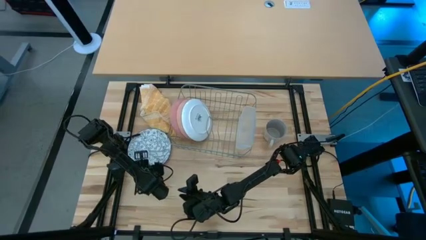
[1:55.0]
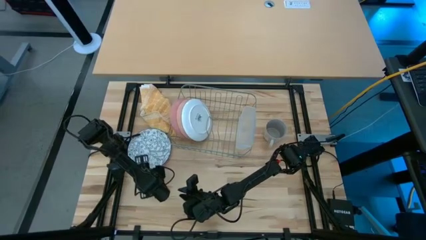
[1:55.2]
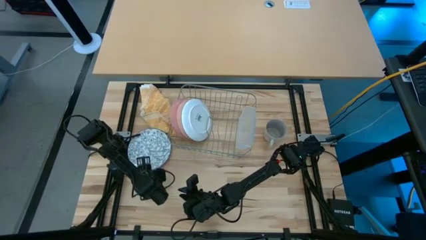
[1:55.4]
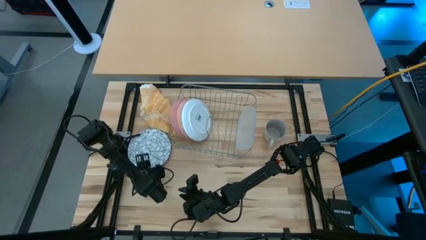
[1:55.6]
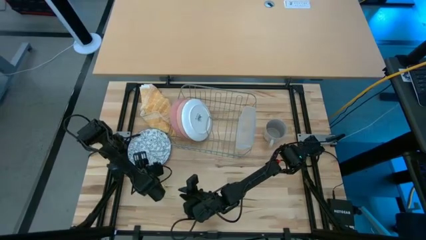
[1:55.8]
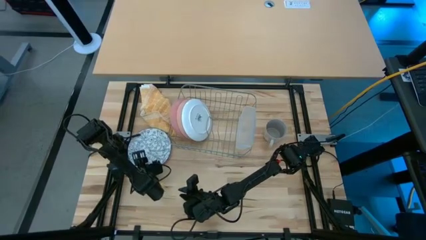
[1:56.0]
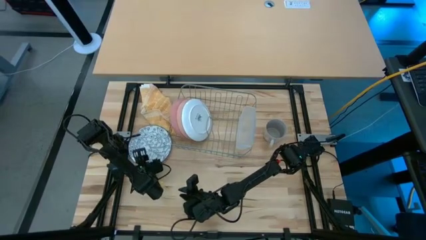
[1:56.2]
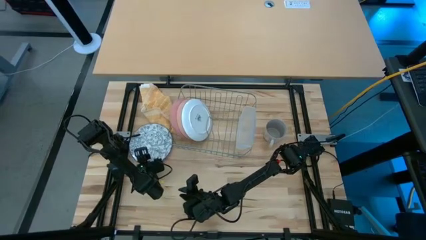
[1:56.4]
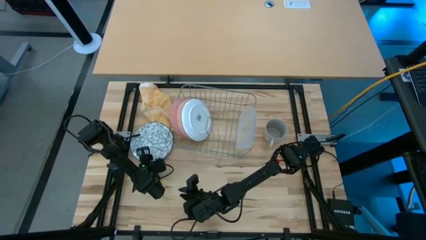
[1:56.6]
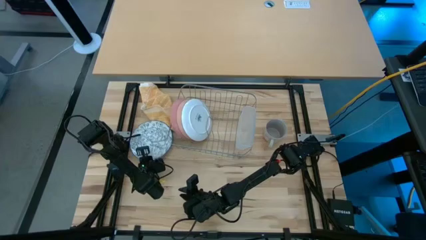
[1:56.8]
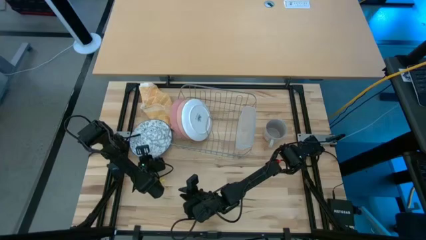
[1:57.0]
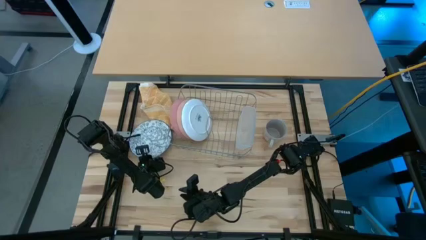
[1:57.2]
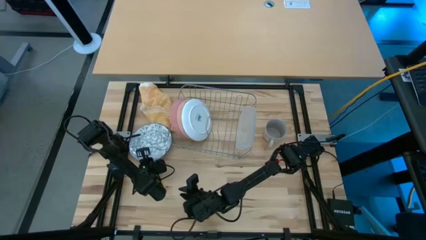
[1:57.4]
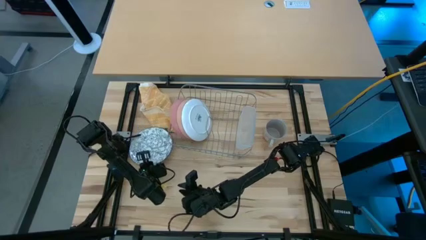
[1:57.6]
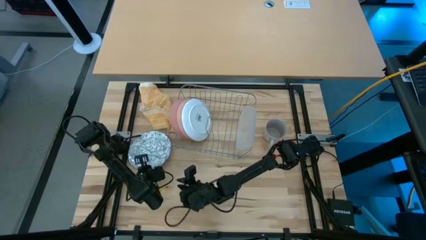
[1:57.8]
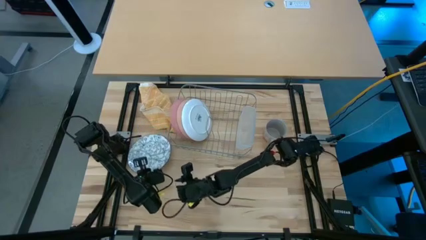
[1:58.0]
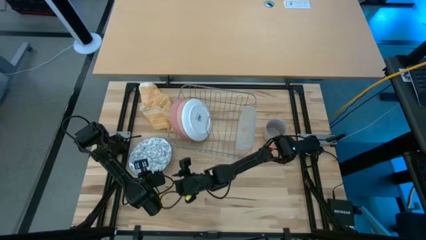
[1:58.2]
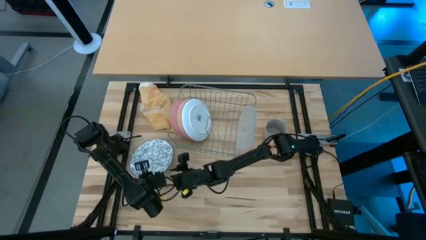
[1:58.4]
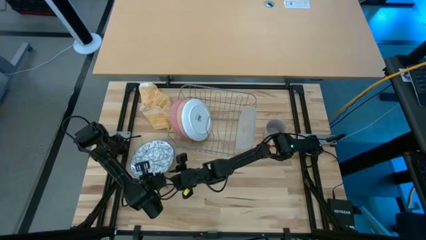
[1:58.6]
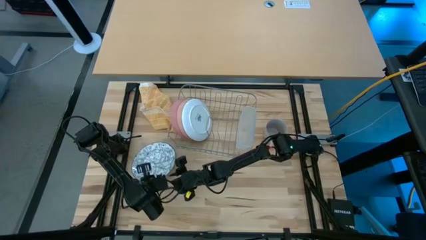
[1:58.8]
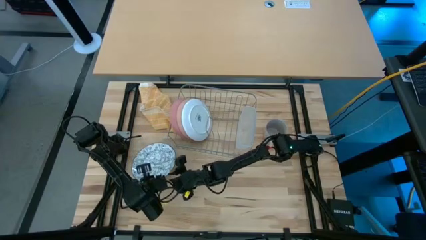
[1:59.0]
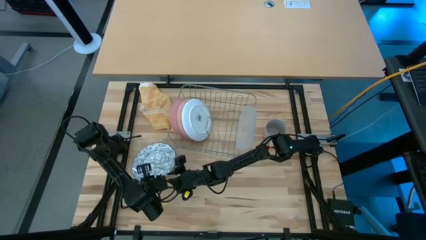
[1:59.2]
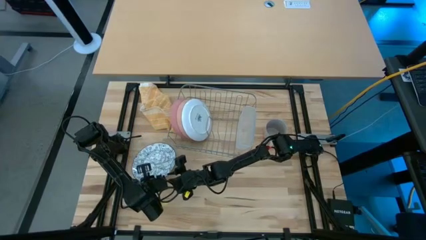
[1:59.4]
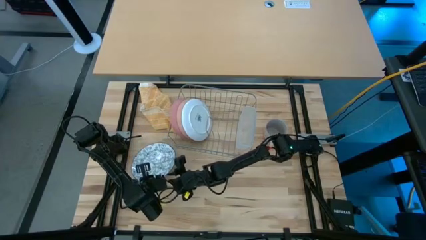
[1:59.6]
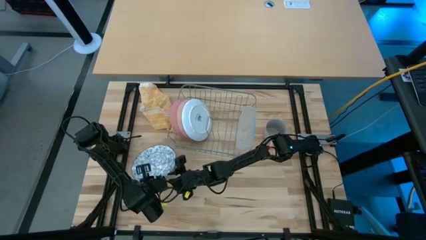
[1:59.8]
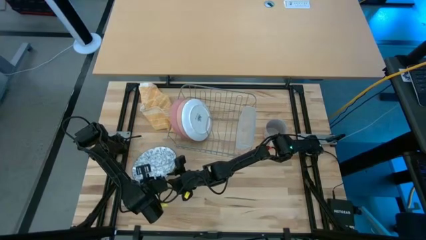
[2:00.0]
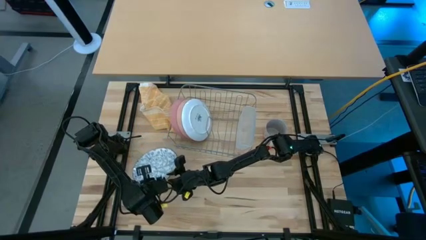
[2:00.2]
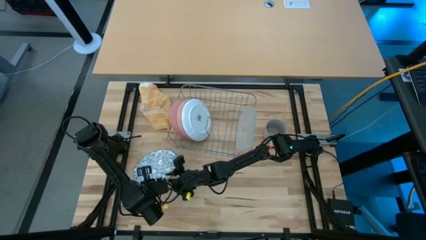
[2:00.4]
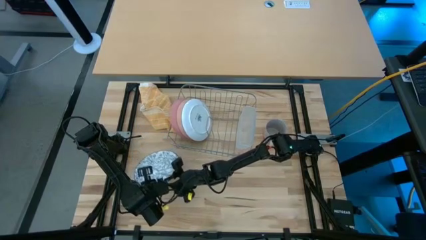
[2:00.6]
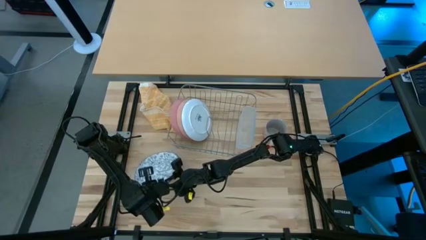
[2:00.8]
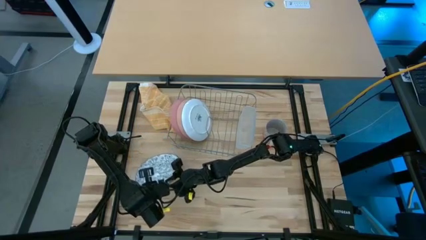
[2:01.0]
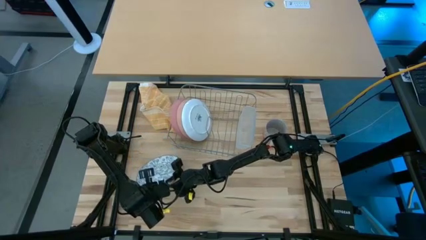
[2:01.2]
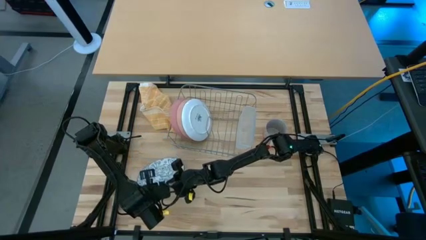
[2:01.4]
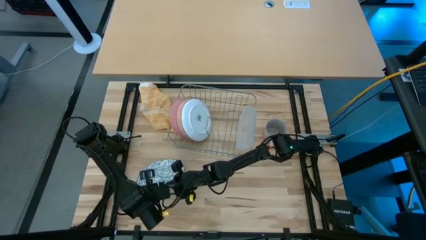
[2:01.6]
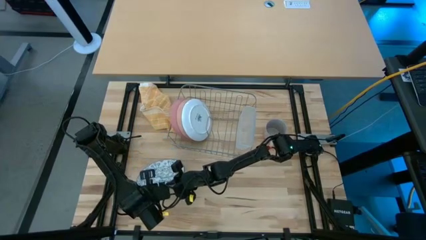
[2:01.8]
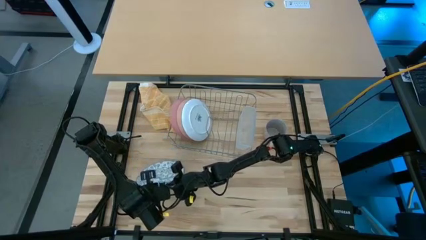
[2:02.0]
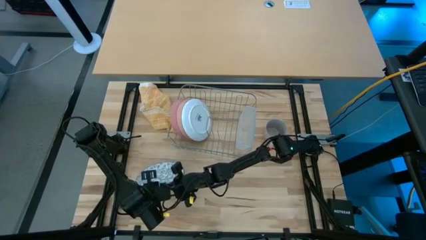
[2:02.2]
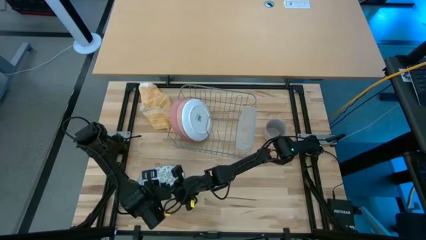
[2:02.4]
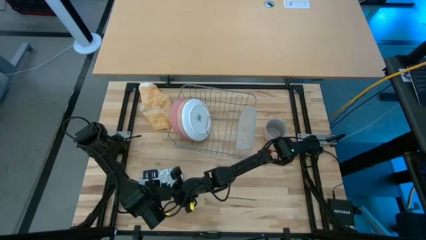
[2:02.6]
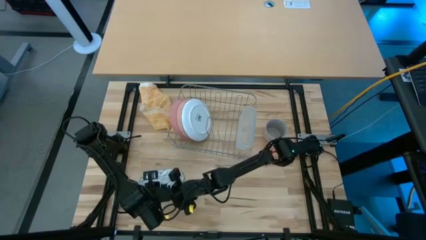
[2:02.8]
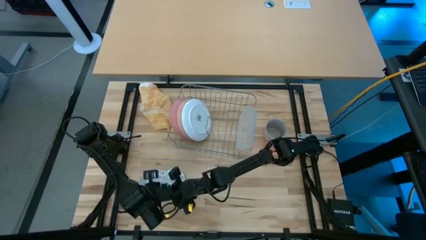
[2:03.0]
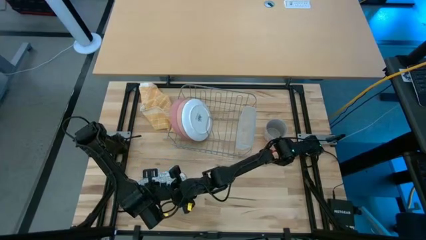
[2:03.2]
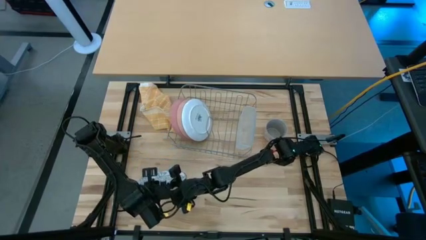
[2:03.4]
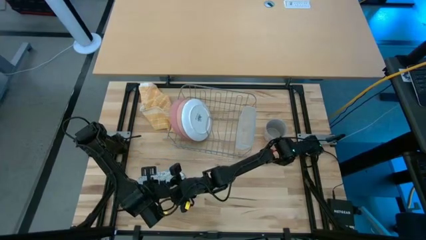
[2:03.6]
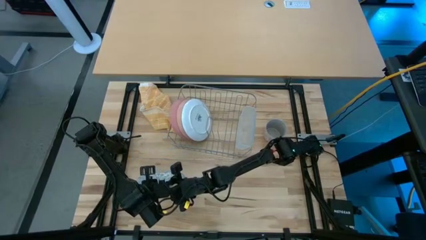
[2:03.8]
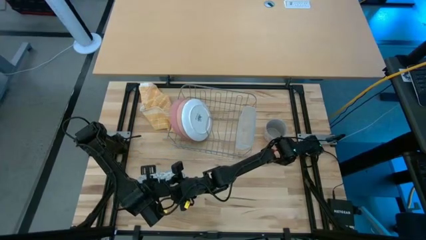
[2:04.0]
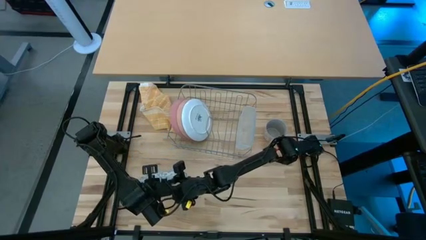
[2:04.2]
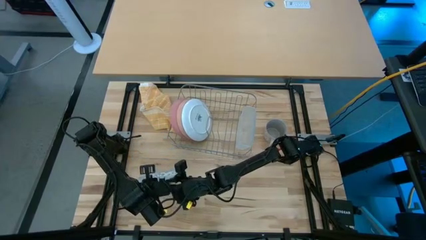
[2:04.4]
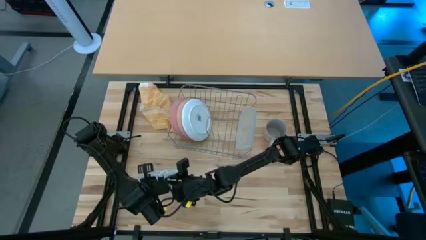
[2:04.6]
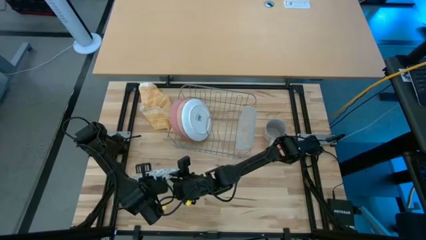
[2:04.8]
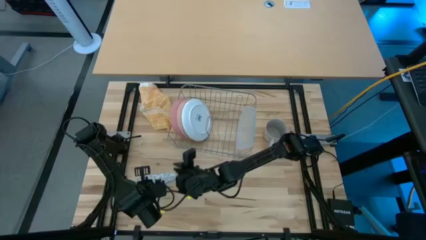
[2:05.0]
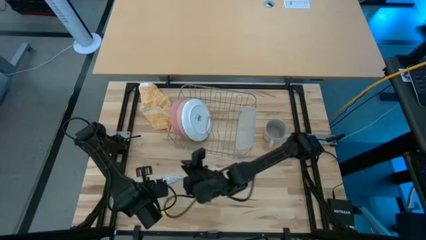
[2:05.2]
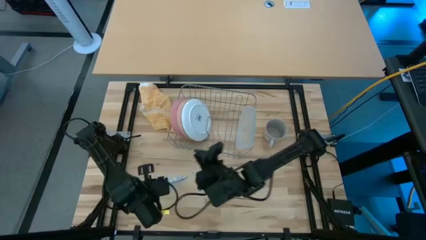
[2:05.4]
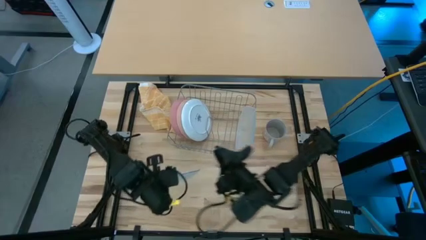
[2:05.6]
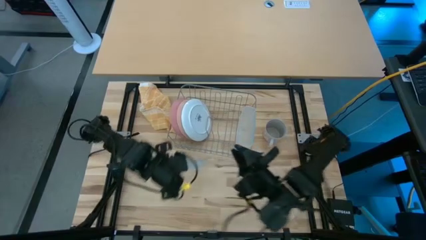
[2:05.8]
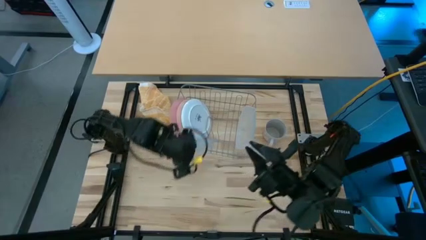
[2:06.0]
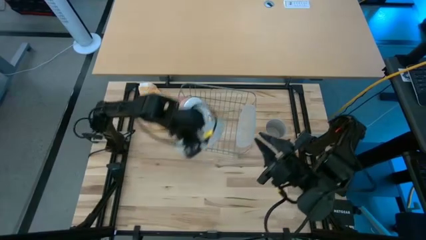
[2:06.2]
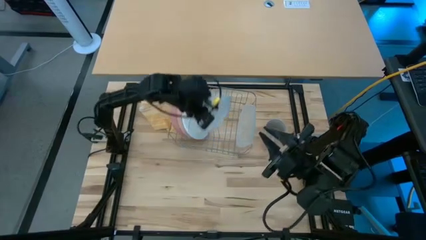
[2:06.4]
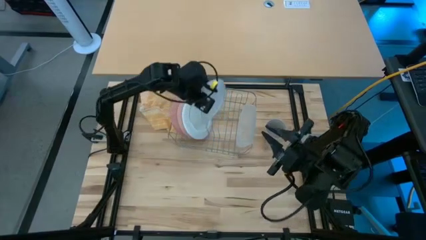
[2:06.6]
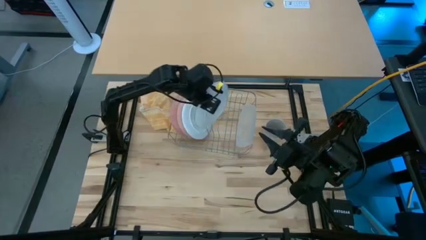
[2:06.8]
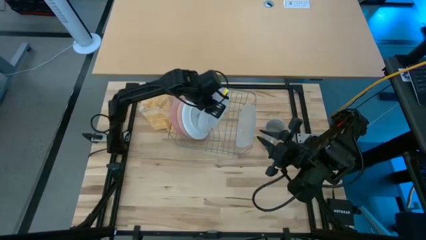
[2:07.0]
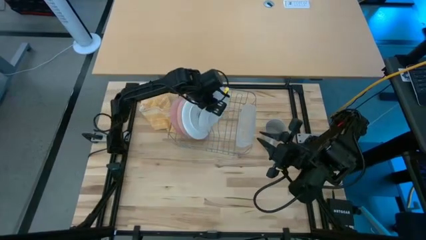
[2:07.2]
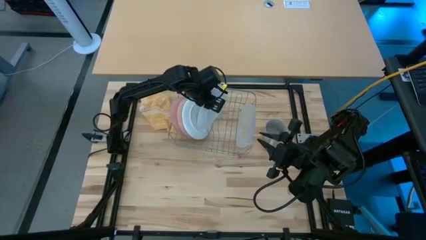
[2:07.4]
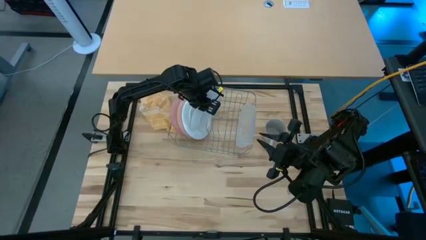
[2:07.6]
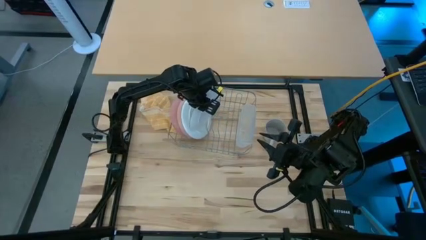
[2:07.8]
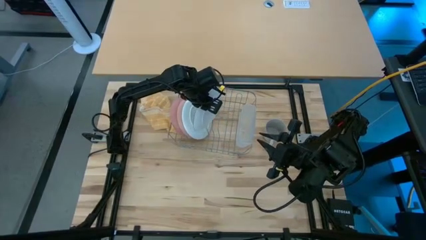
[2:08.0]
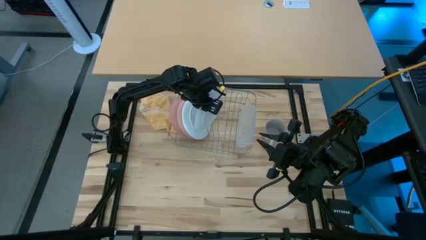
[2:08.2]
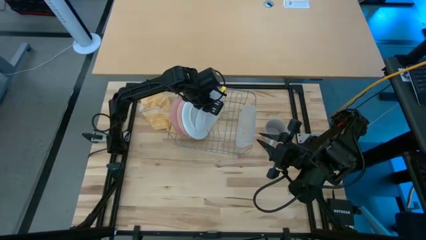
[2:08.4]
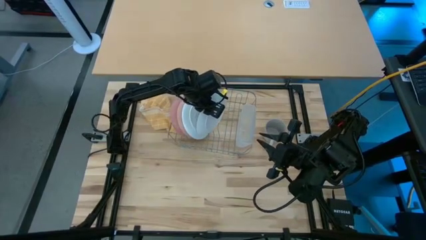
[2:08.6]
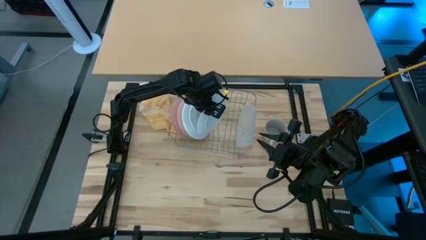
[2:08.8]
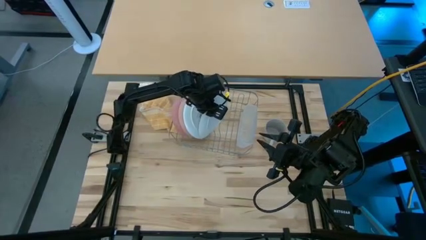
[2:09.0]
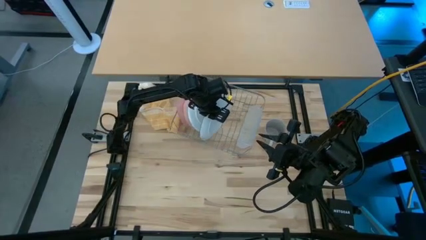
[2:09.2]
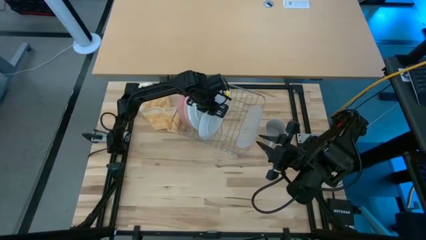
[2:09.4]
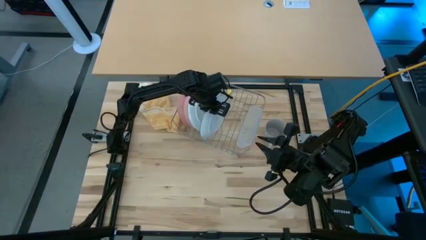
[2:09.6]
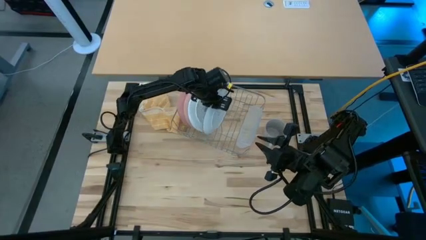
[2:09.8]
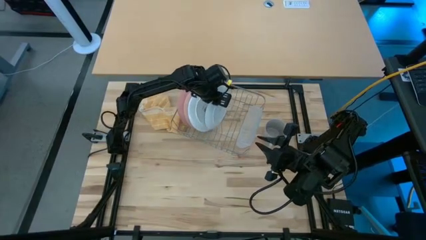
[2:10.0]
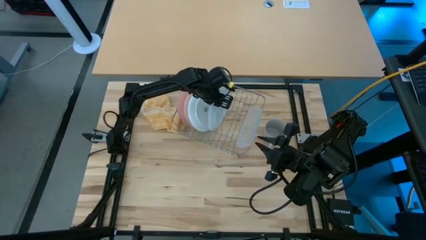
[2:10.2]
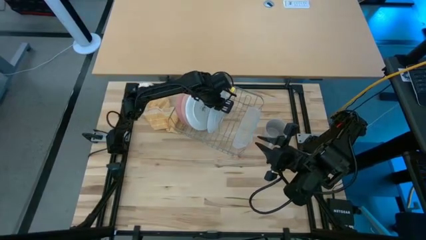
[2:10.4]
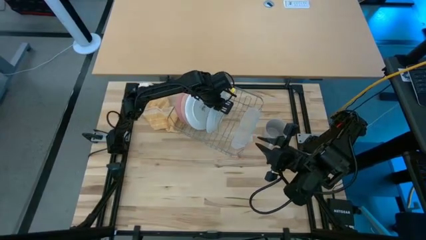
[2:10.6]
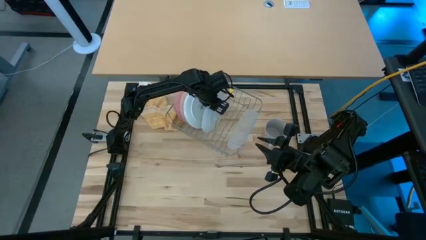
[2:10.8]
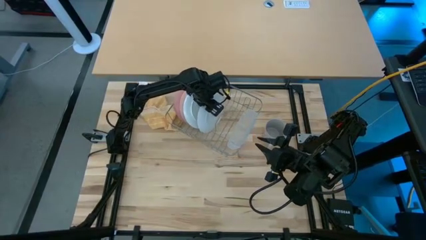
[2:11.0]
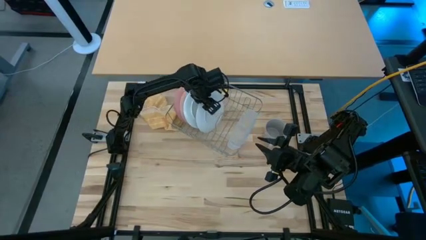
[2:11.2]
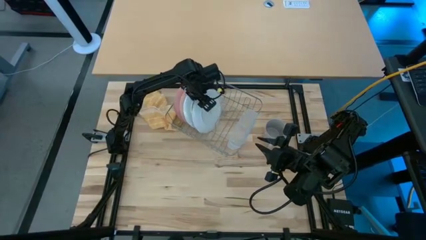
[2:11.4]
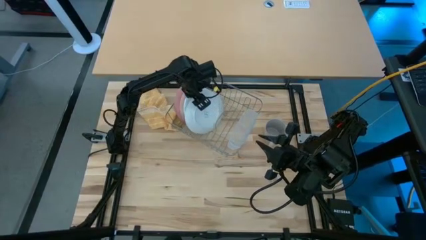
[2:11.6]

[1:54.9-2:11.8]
Task: Sort dishes
Put the white patterned plate in the dish rack
